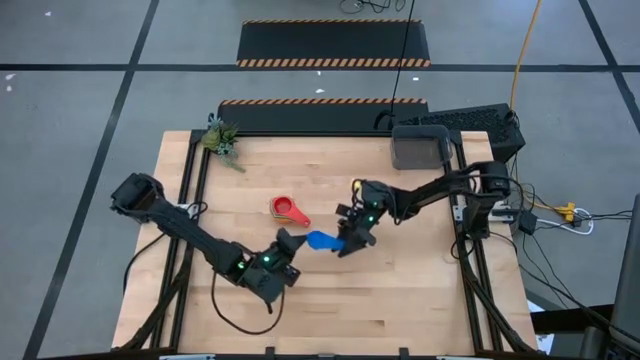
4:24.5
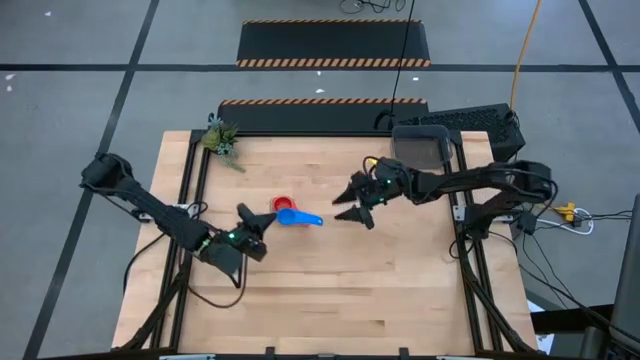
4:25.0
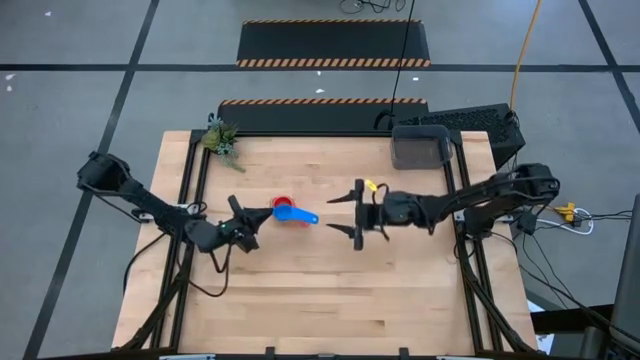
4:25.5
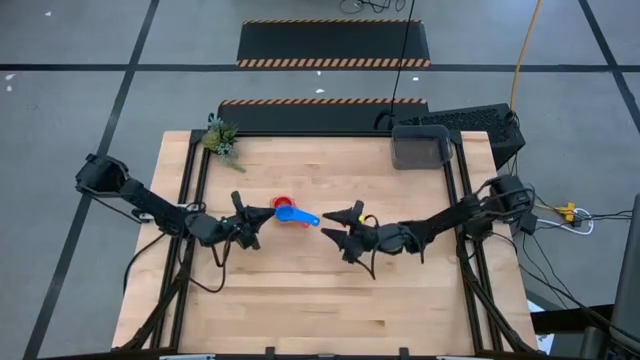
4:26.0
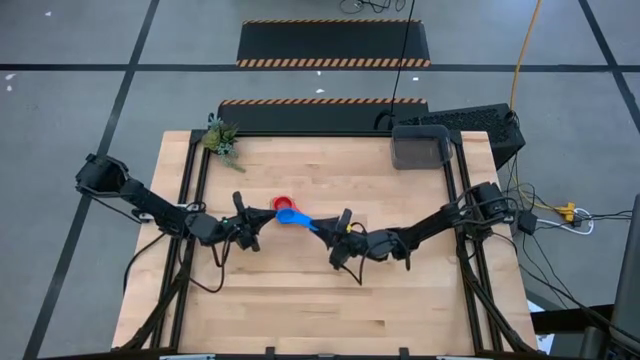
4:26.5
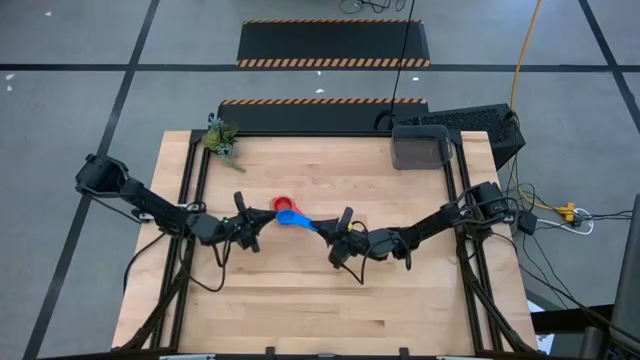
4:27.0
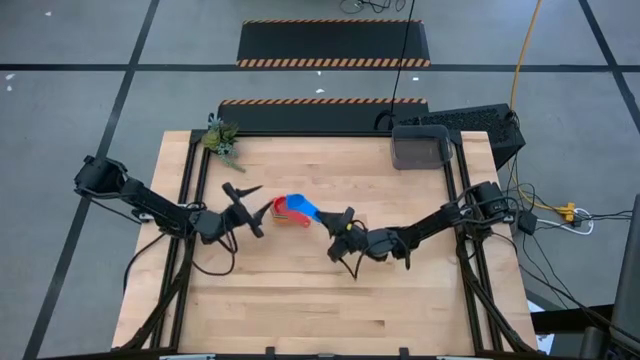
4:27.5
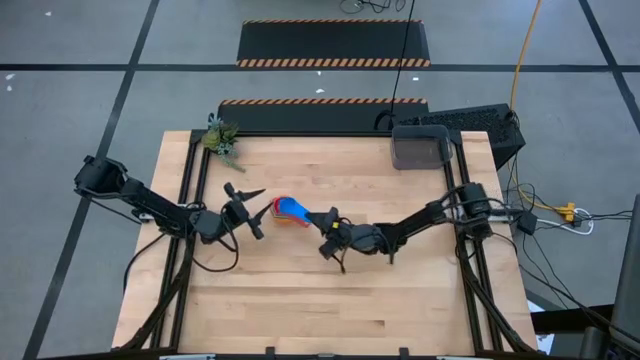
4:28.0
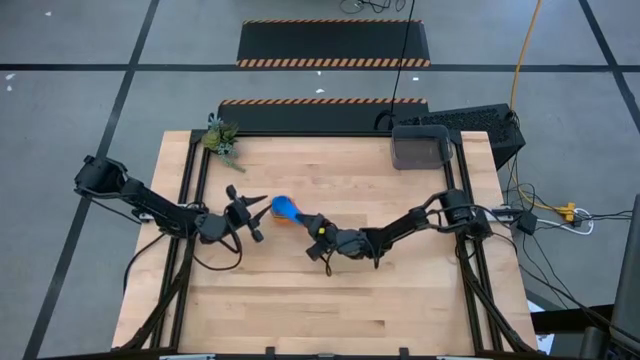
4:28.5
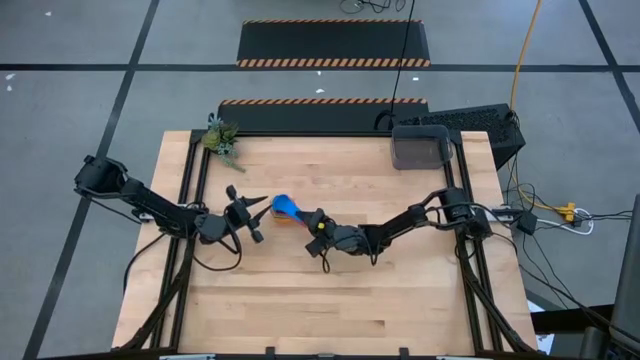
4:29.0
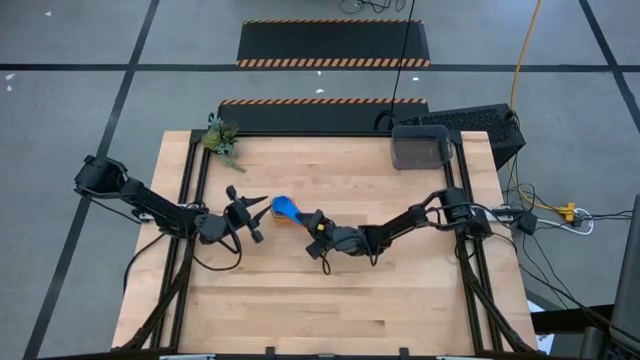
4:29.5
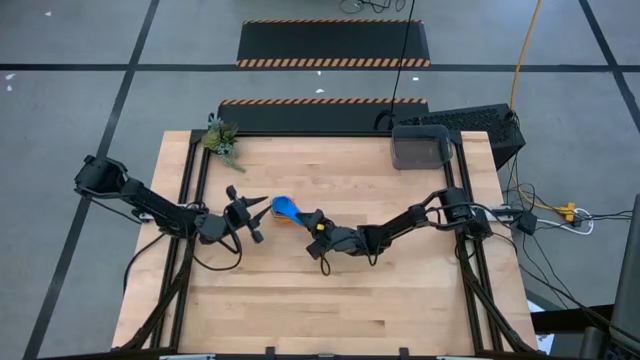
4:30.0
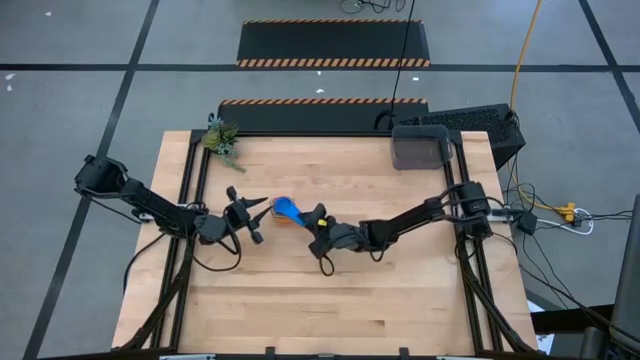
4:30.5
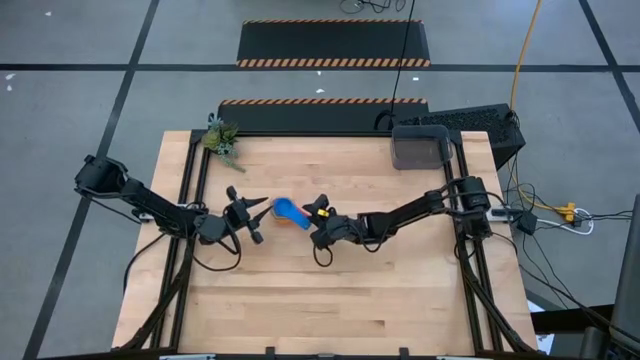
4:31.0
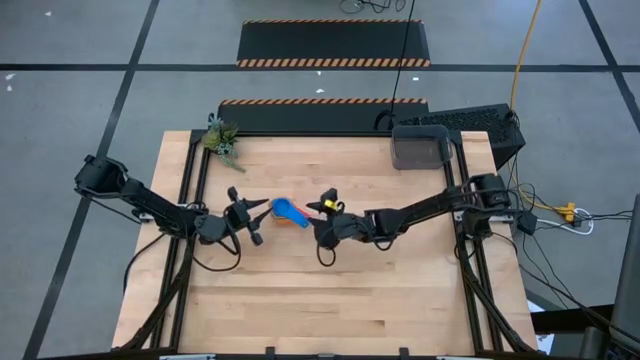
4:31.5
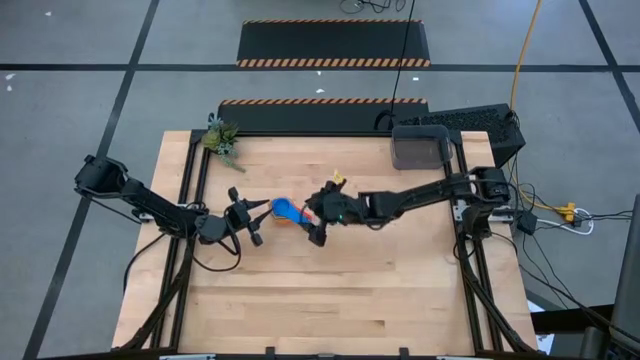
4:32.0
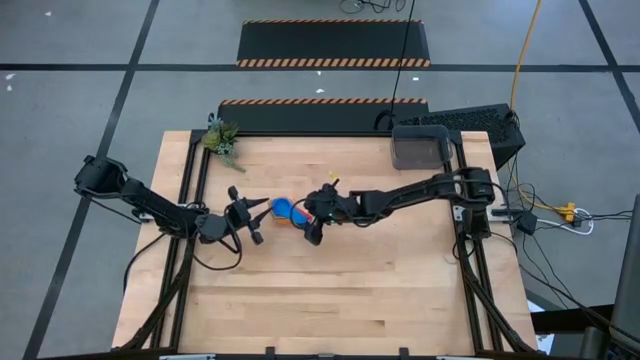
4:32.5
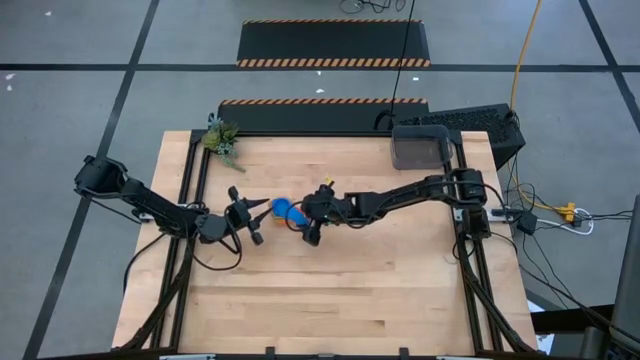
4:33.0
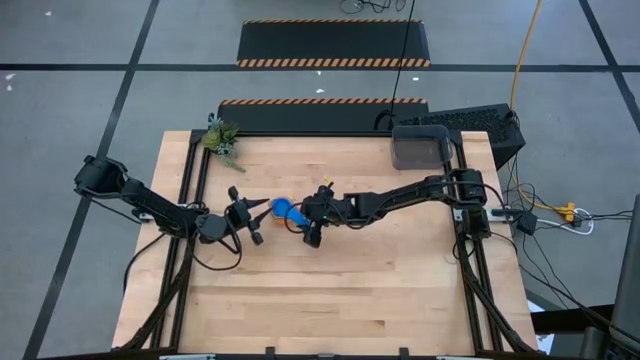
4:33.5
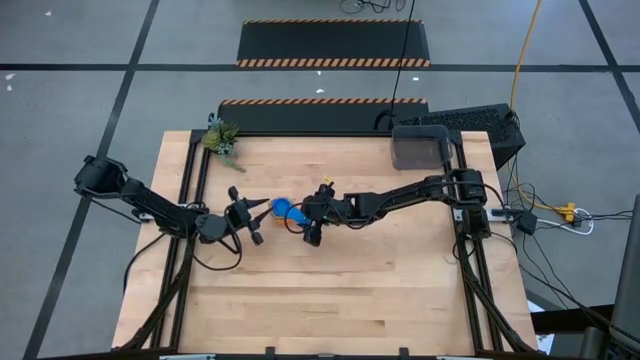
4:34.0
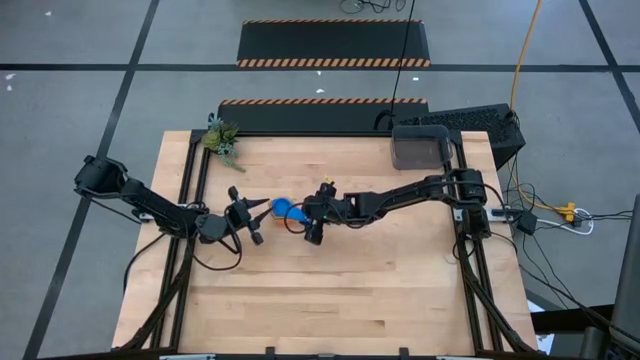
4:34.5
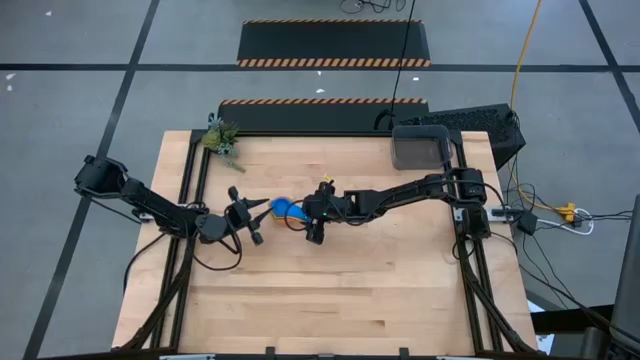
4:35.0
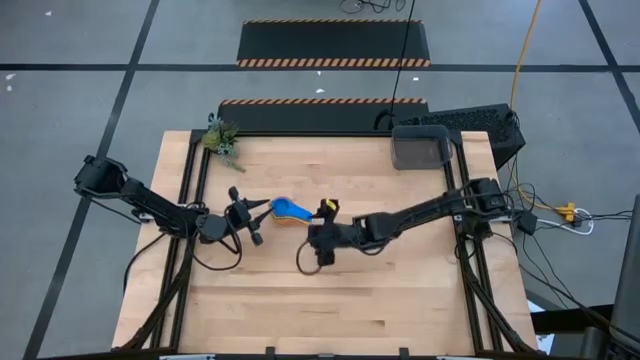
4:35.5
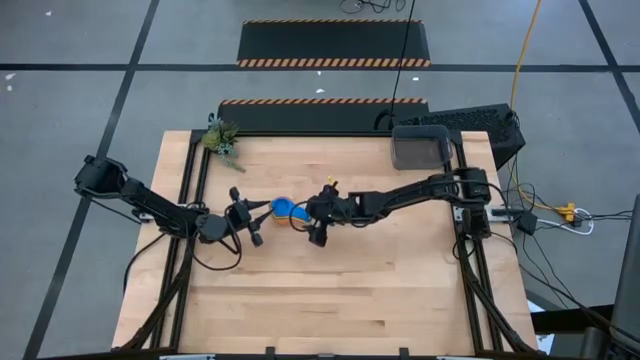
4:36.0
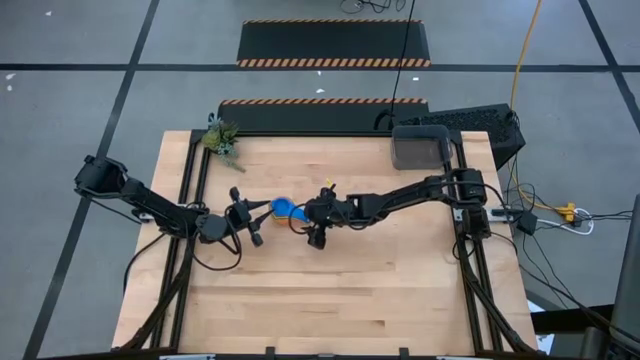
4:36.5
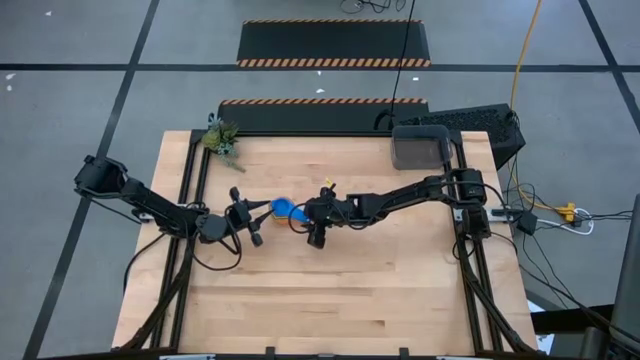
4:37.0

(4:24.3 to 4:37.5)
Task: Nest measuring cups in basket
Stack the blue measuring cup on top of the light red measuring cup

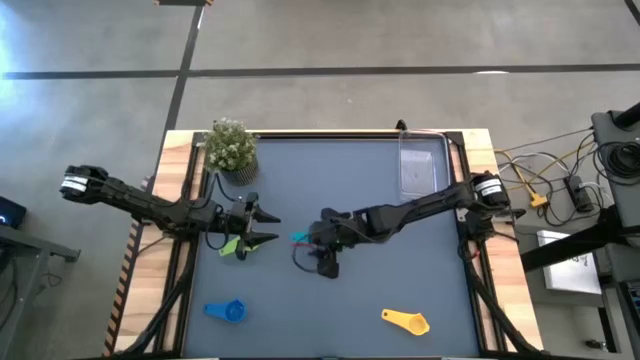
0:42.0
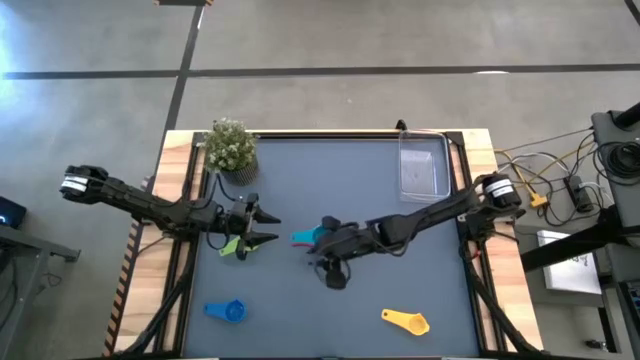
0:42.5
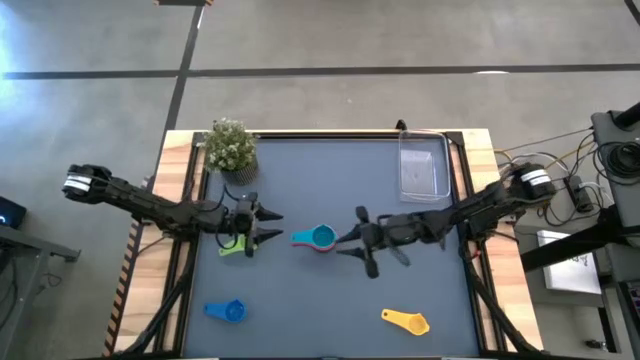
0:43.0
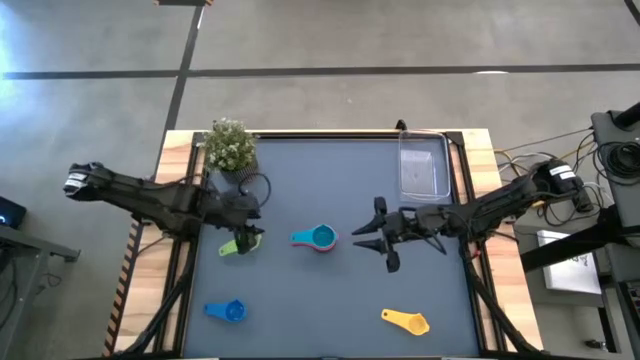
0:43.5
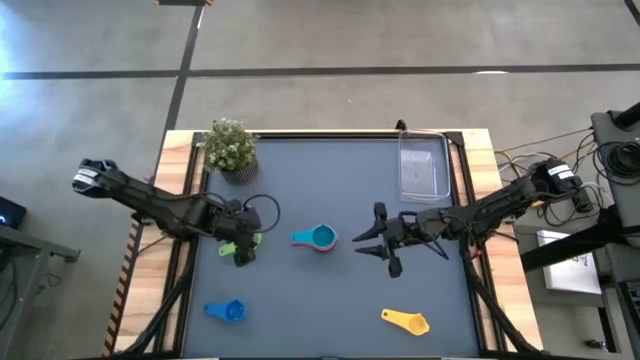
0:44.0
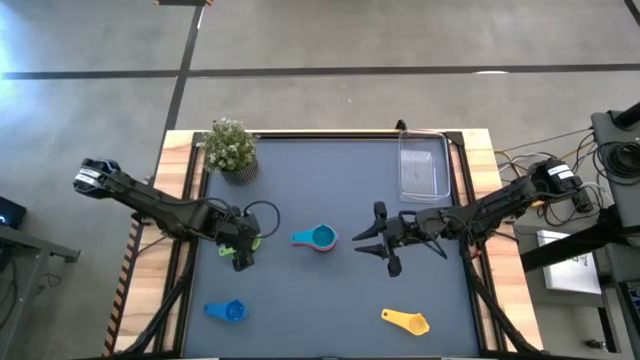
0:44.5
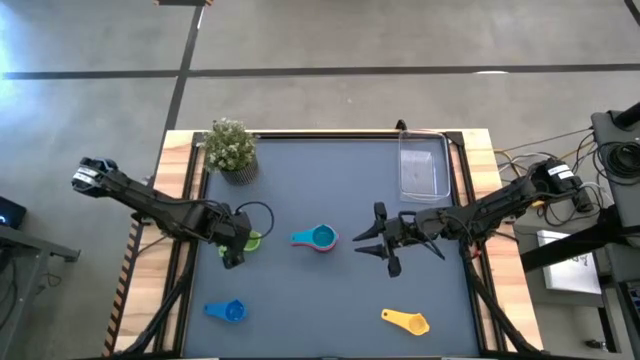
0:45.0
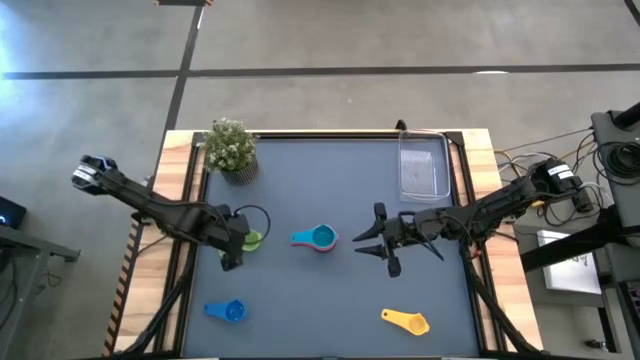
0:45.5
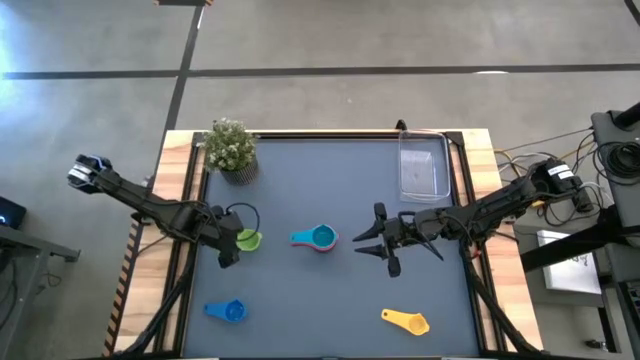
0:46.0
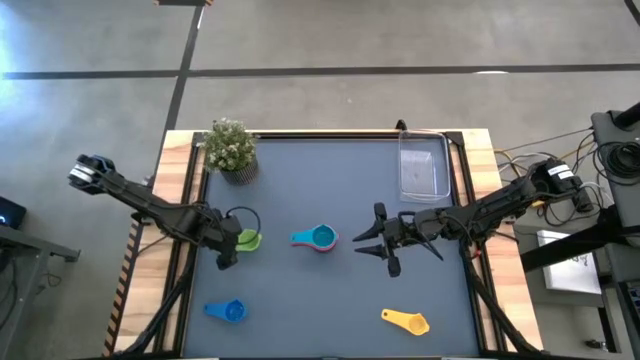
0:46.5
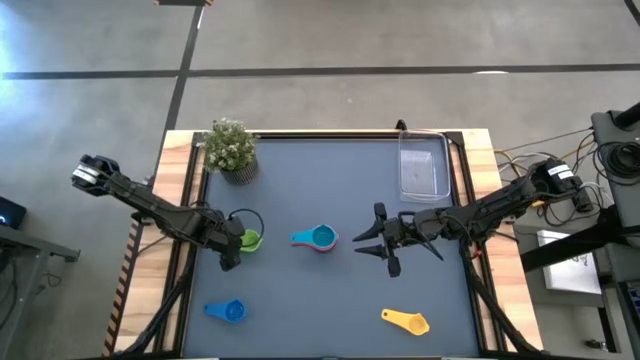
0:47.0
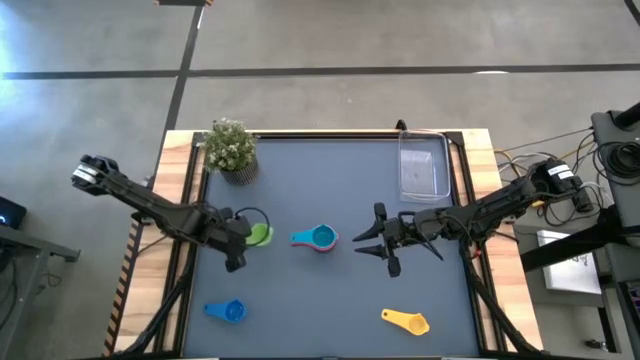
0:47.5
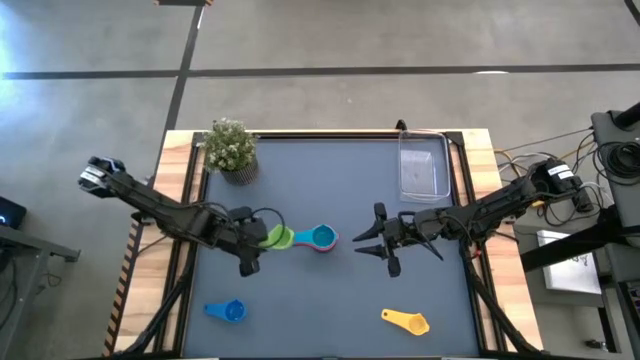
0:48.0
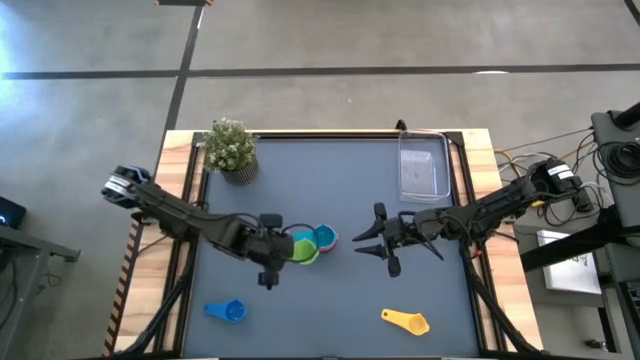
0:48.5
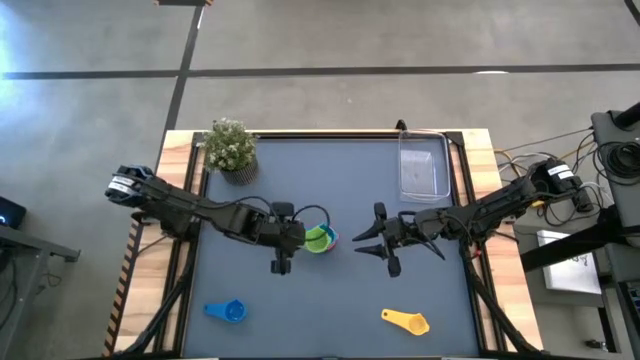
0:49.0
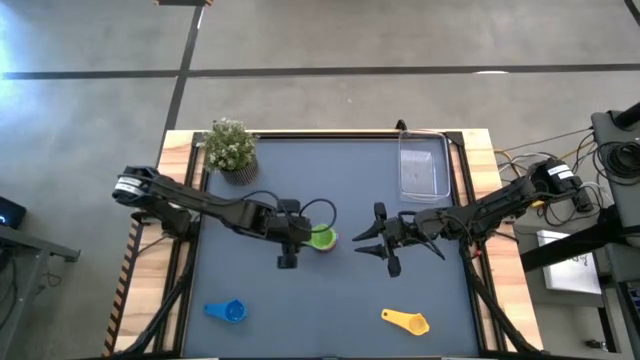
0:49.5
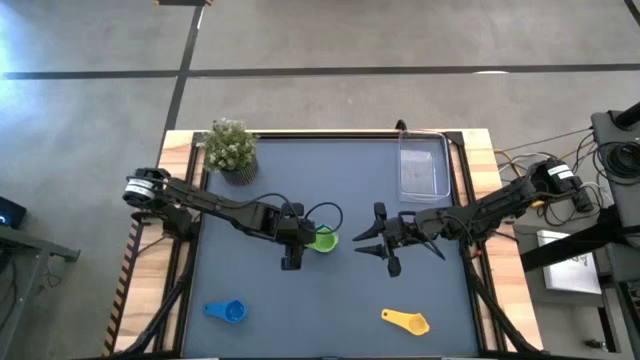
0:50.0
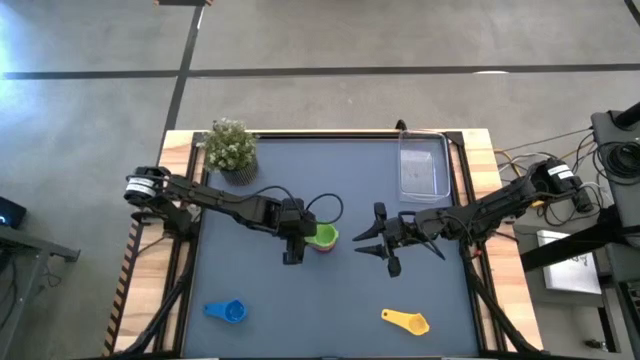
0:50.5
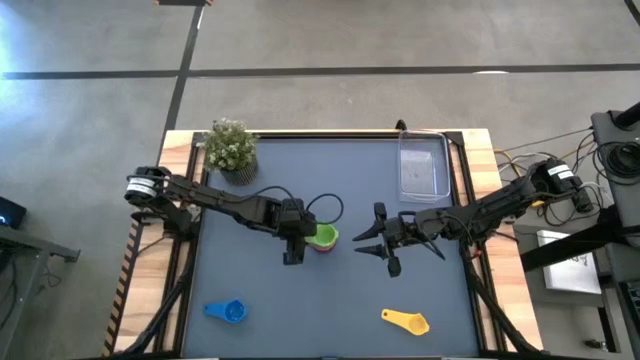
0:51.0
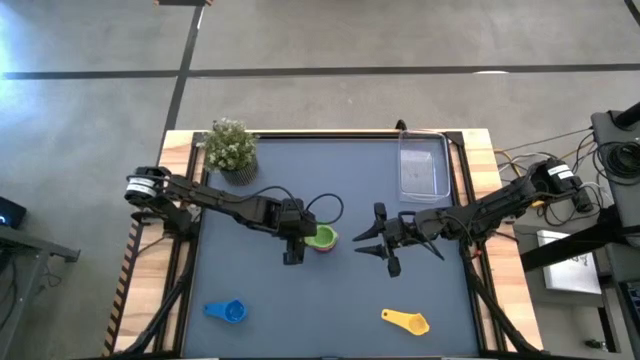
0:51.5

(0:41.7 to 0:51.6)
Task: Nest measuring cups in basket
Stack the green measuring cup on top of the light blue measuring cup
